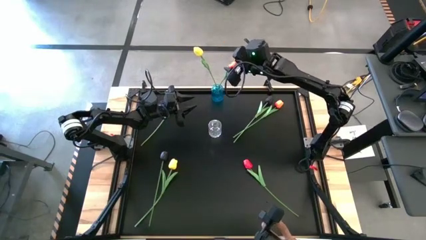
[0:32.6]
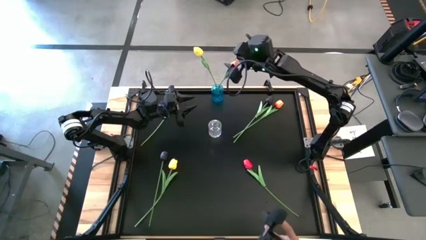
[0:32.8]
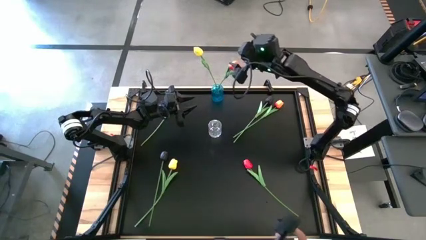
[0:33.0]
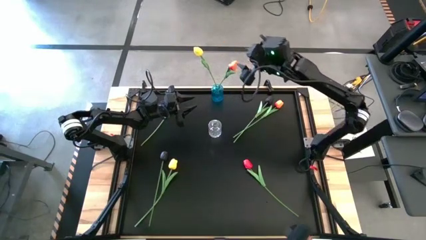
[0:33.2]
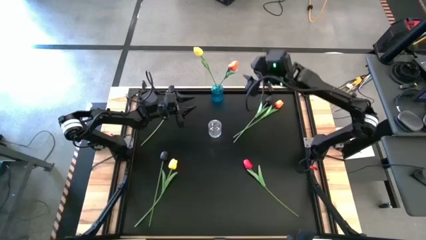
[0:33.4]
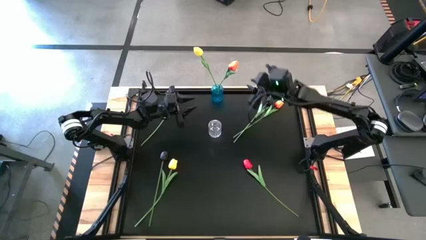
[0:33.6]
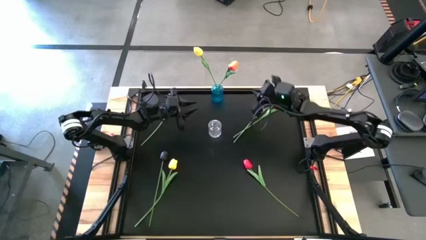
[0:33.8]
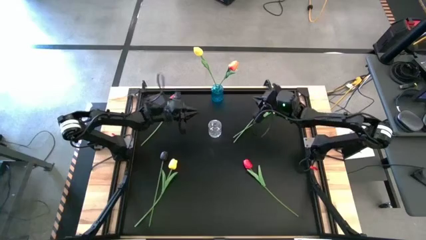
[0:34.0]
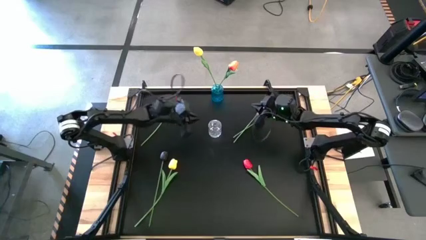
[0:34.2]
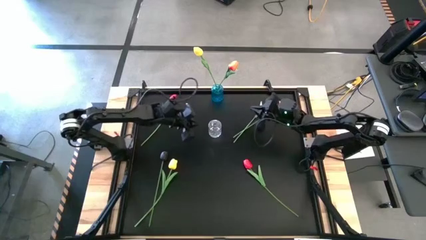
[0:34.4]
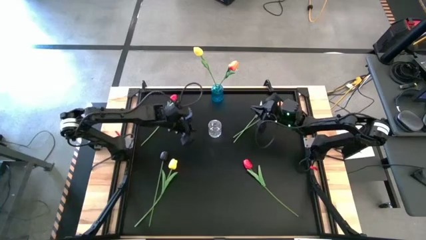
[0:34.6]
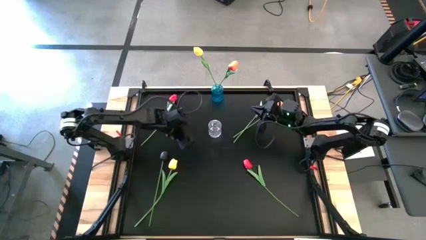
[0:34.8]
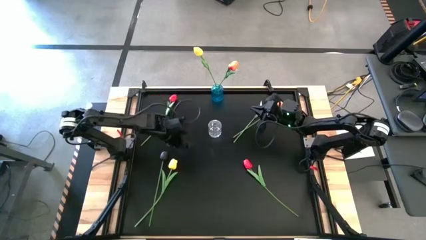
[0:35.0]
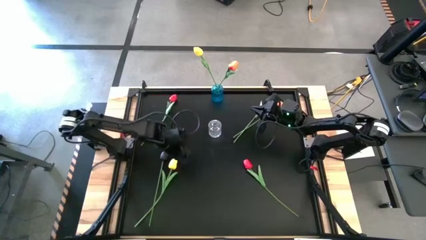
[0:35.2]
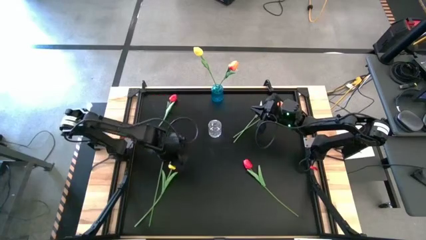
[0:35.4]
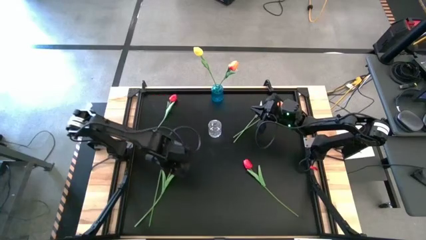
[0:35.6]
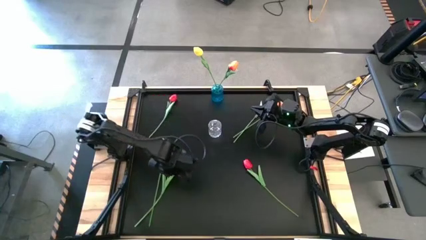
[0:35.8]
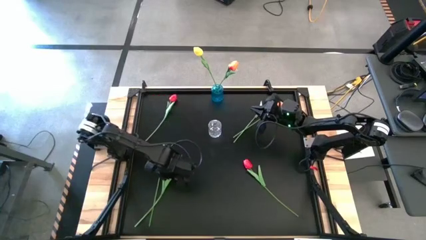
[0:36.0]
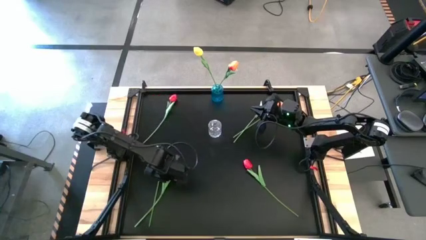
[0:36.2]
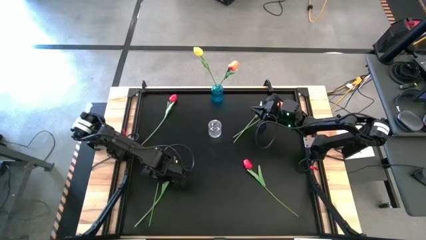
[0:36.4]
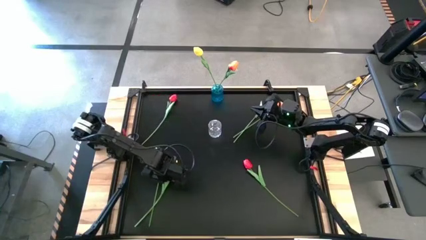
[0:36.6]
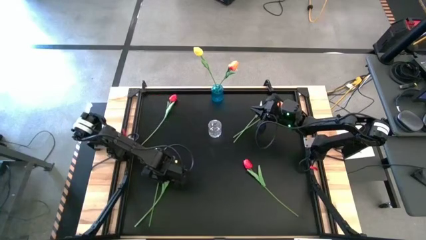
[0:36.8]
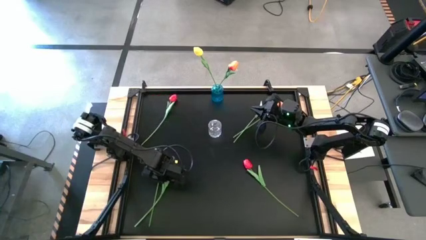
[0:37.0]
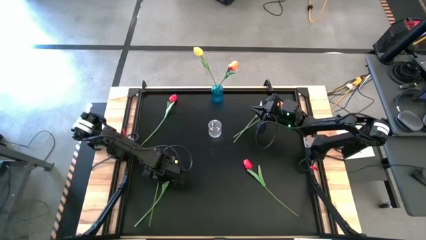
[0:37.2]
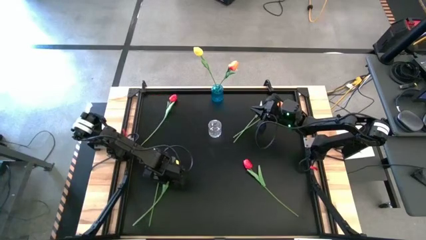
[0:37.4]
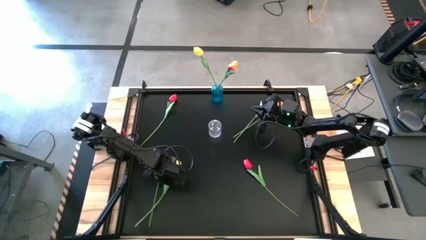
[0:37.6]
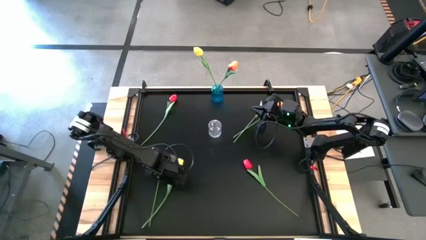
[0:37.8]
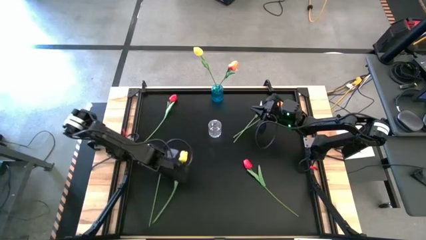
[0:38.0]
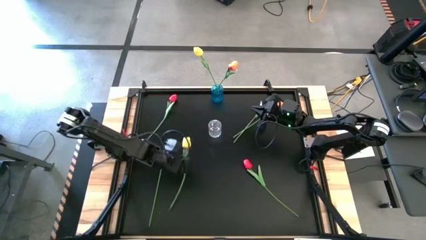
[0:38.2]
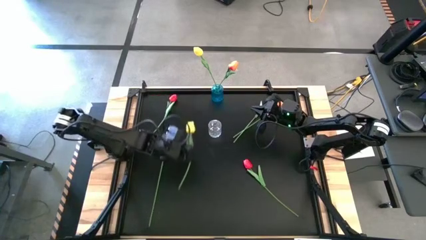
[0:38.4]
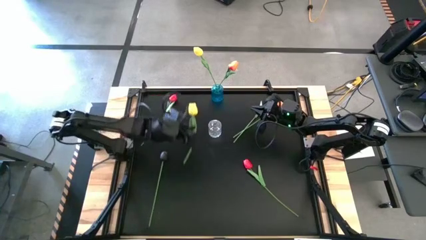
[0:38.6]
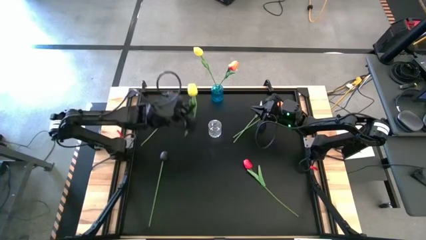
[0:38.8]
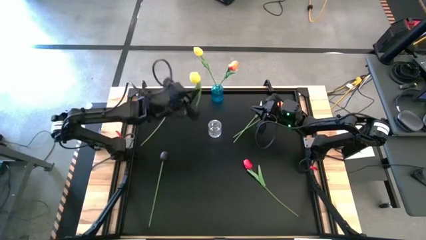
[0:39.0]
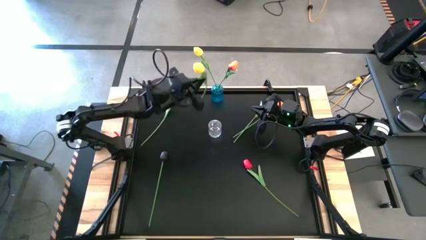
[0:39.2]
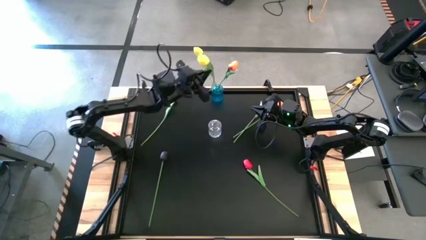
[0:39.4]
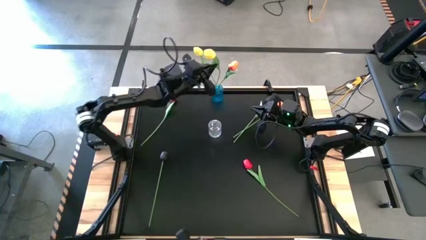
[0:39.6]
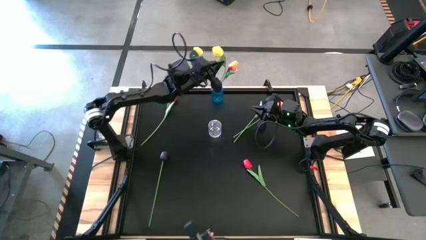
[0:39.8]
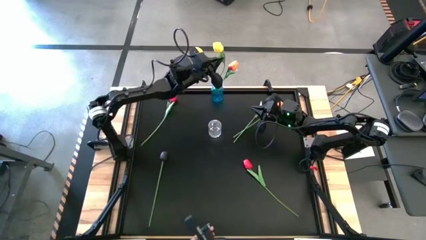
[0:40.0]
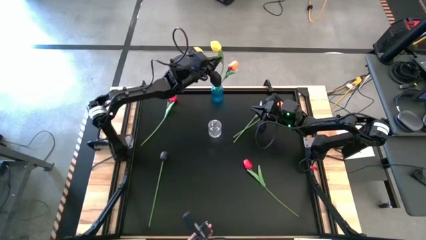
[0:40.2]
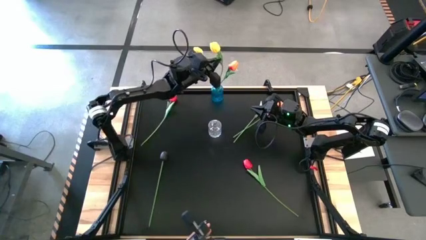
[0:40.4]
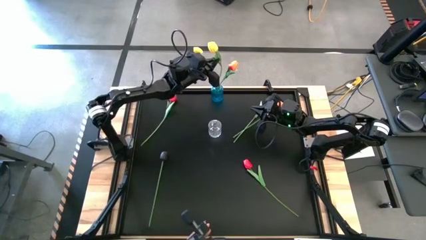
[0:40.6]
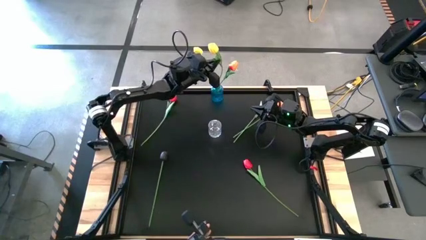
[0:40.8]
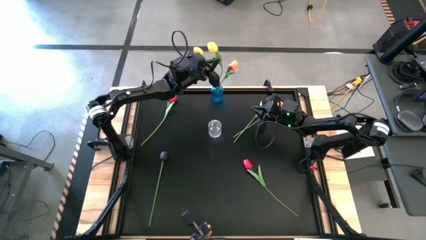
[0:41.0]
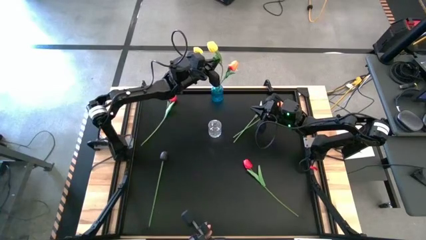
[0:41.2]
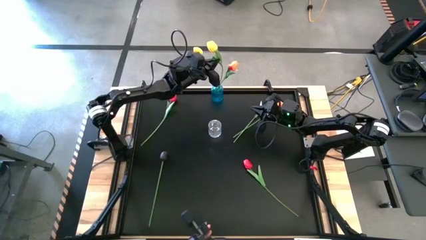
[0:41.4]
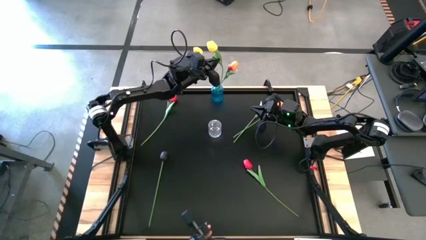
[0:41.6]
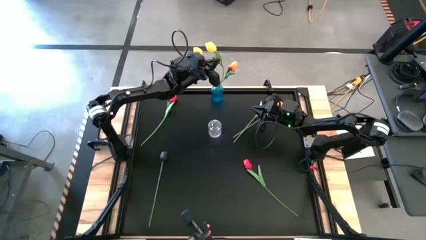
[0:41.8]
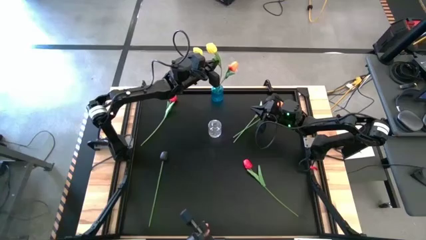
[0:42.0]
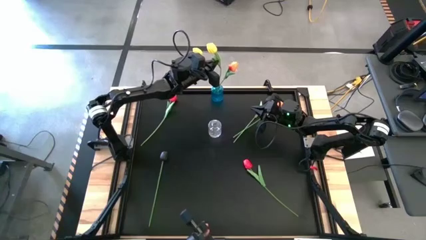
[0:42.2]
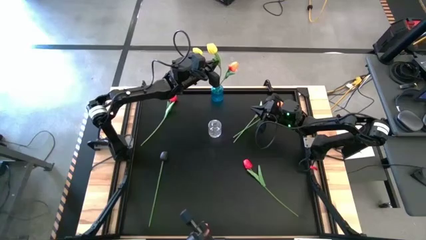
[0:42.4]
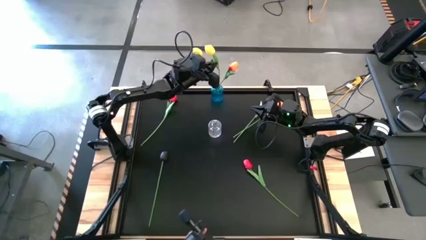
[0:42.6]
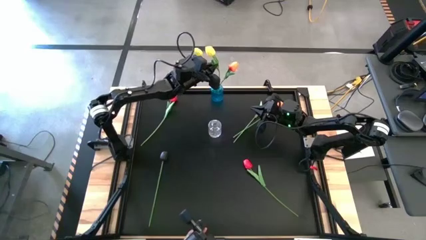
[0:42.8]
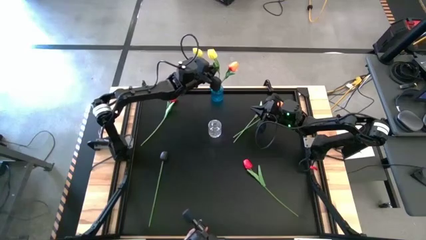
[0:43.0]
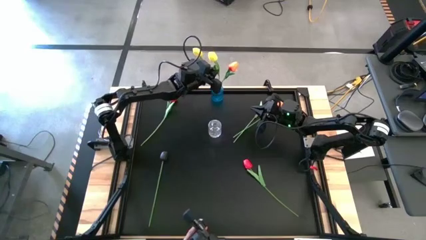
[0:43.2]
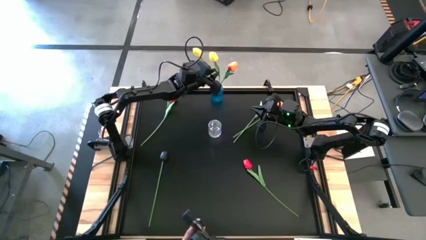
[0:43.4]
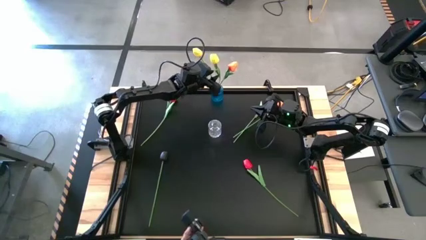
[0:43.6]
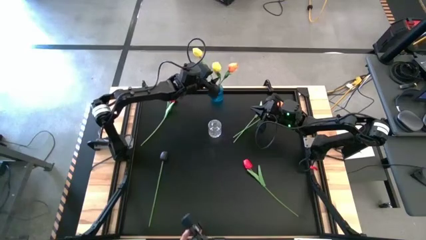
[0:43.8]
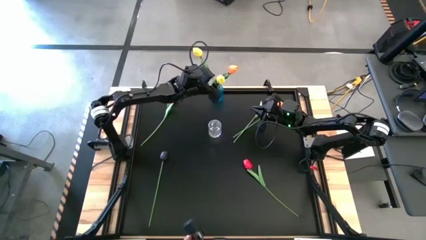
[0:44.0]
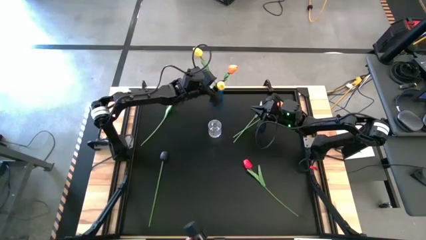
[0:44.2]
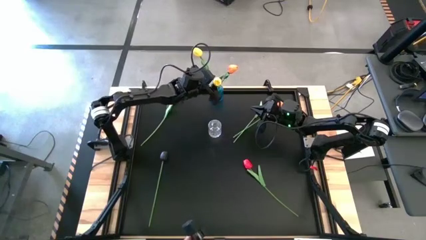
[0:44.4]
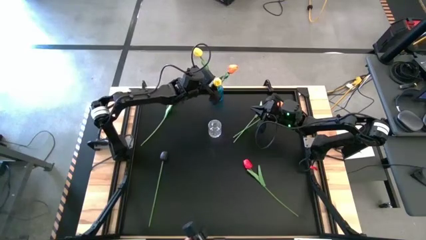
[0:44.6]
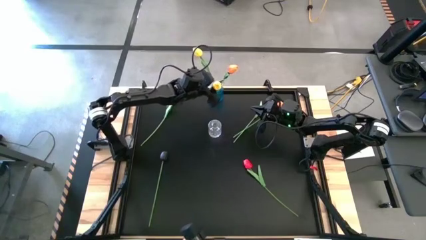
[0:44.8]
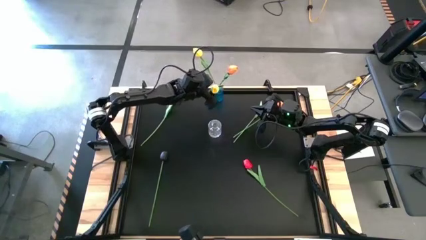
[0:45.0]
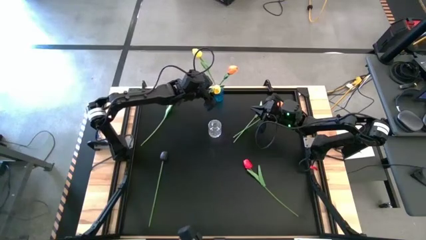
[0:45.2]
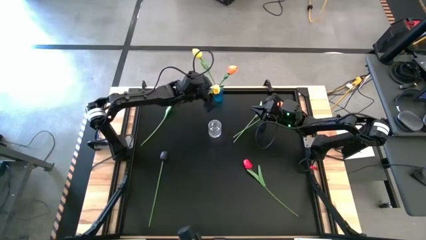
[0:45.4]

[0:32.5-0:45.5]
Task: Sort flowers into vase by color
Put the yellow tulip into the blue vase
